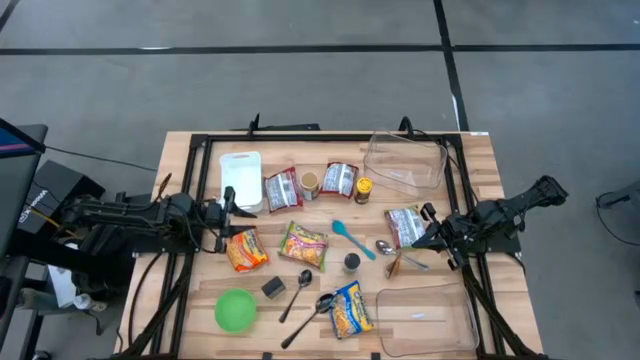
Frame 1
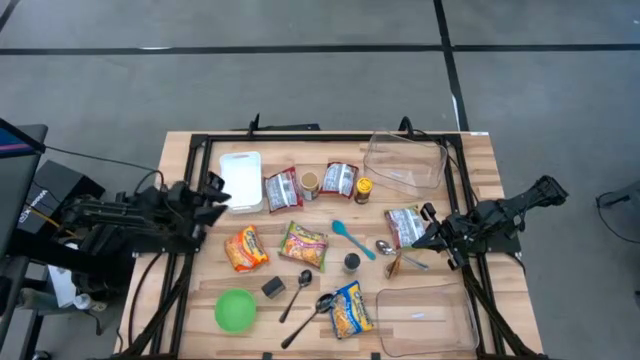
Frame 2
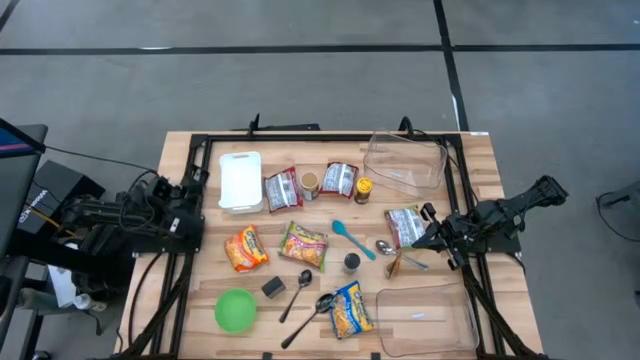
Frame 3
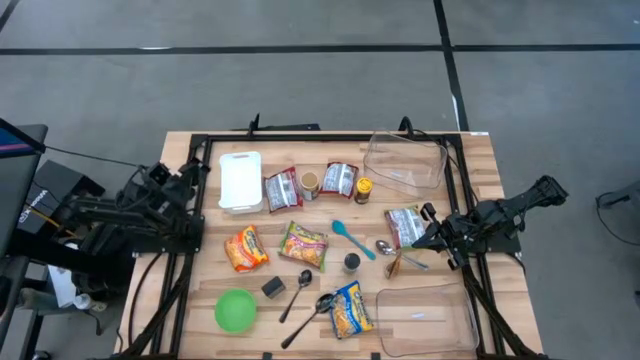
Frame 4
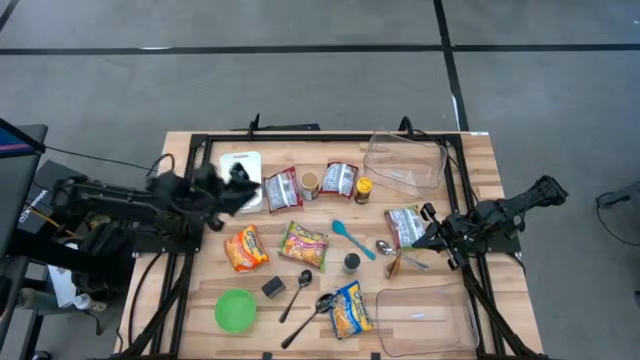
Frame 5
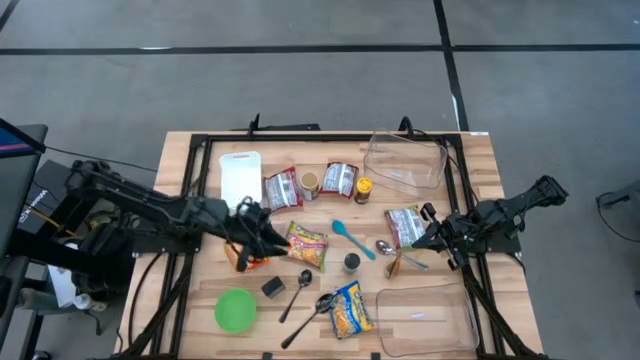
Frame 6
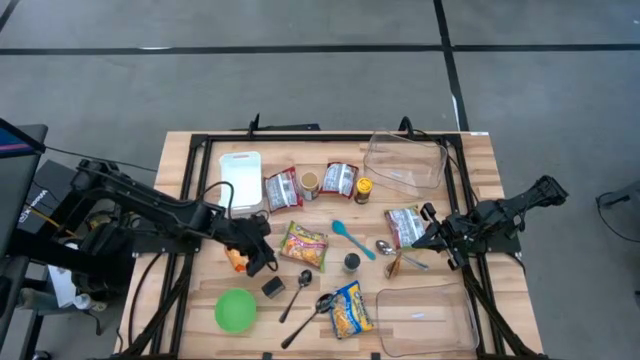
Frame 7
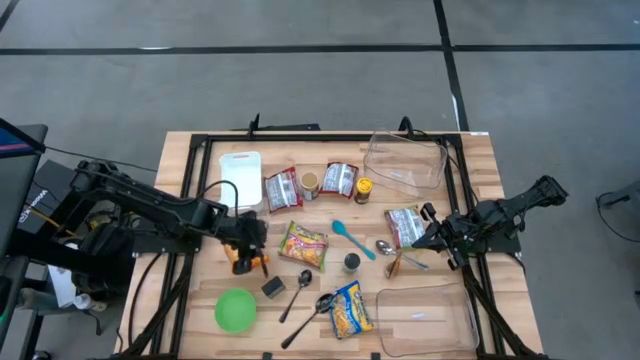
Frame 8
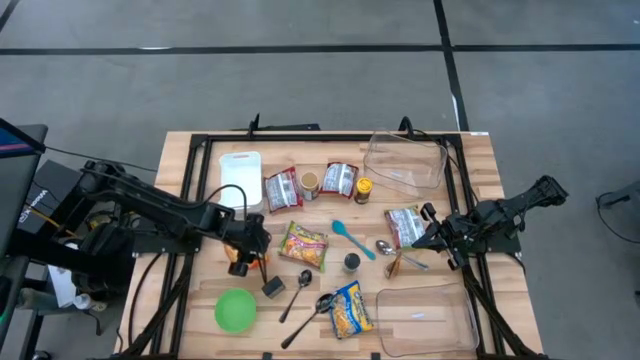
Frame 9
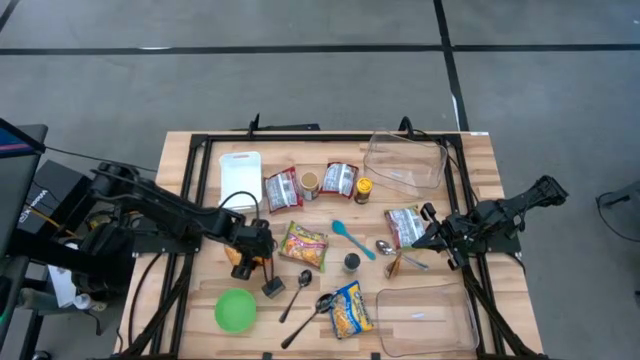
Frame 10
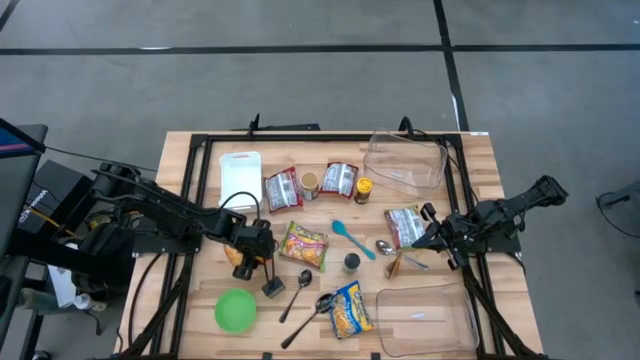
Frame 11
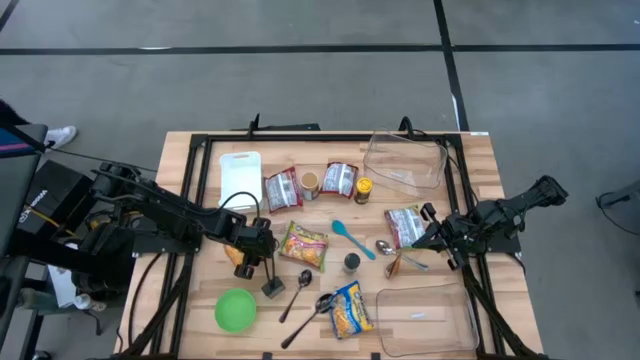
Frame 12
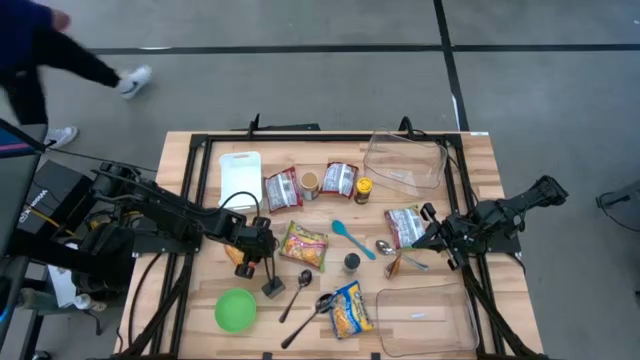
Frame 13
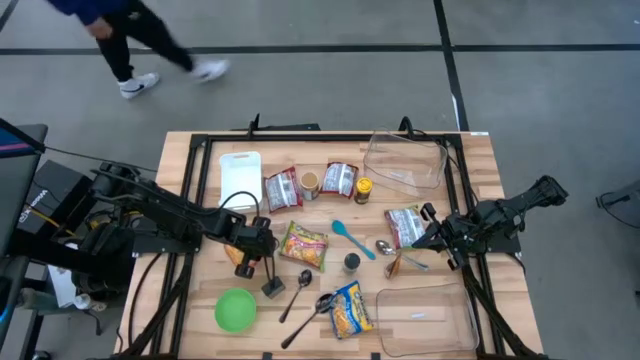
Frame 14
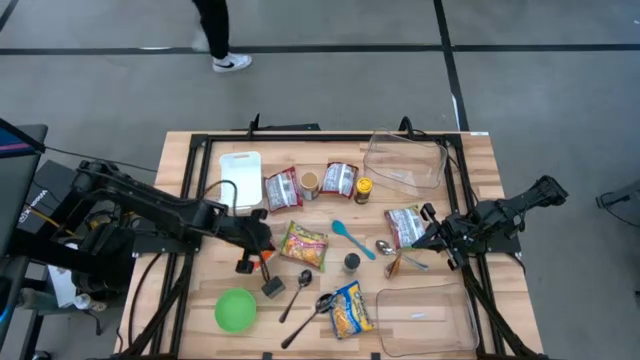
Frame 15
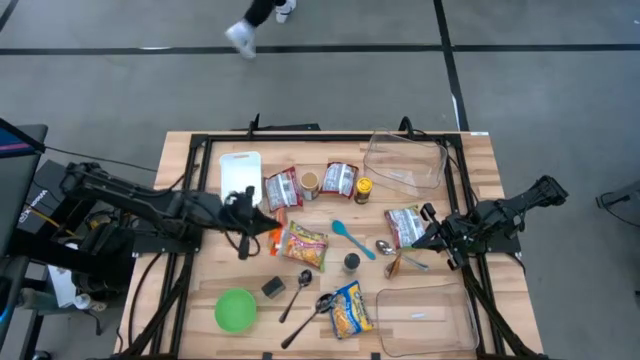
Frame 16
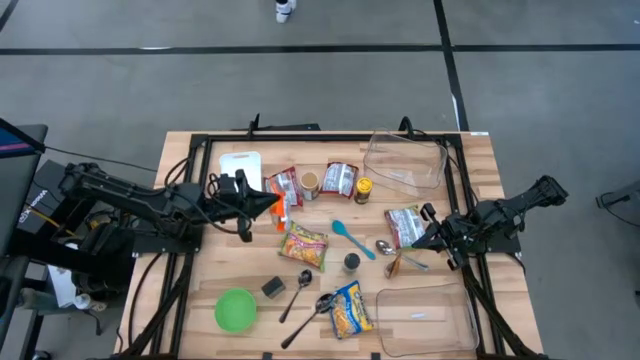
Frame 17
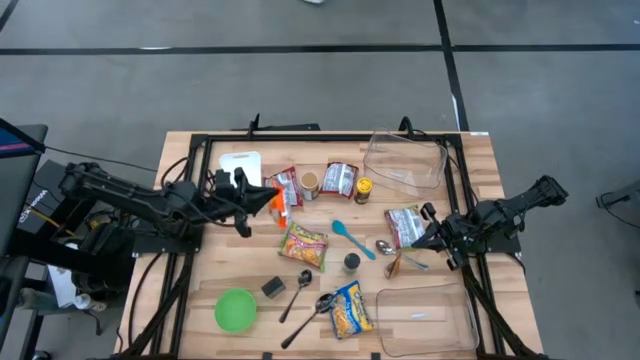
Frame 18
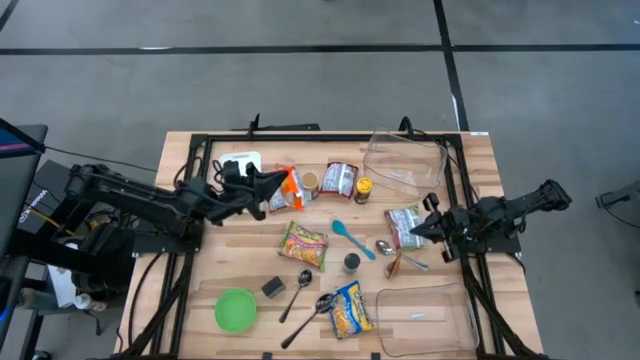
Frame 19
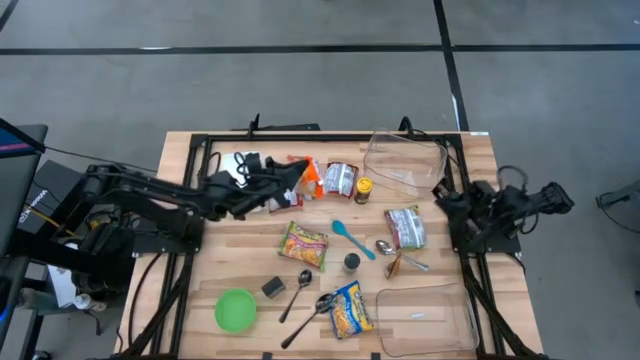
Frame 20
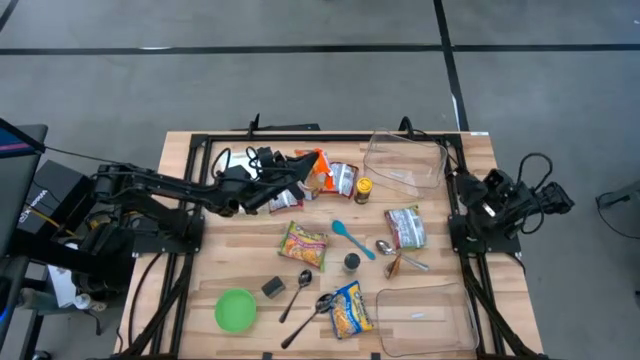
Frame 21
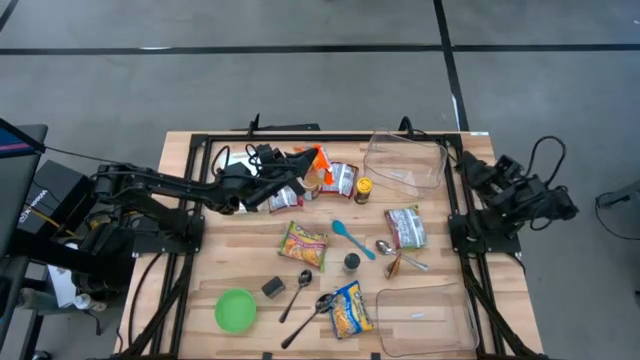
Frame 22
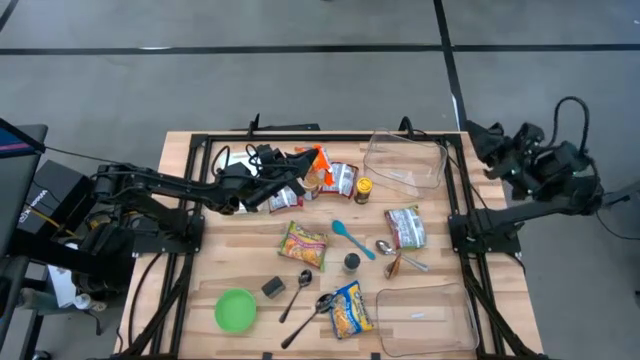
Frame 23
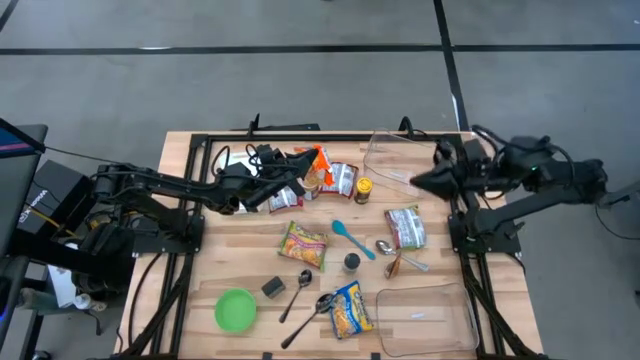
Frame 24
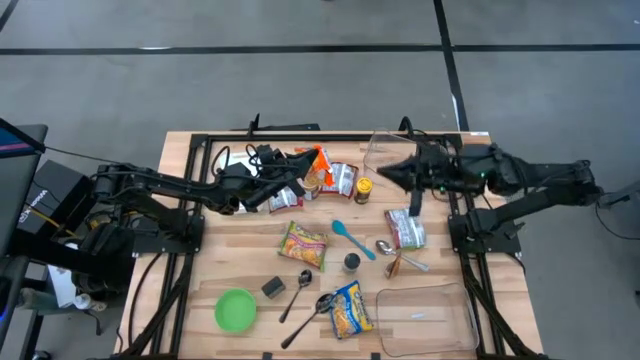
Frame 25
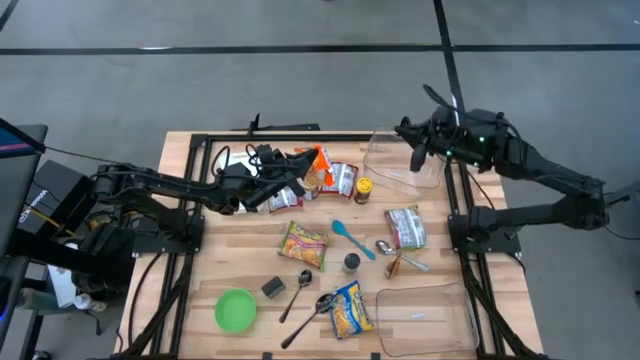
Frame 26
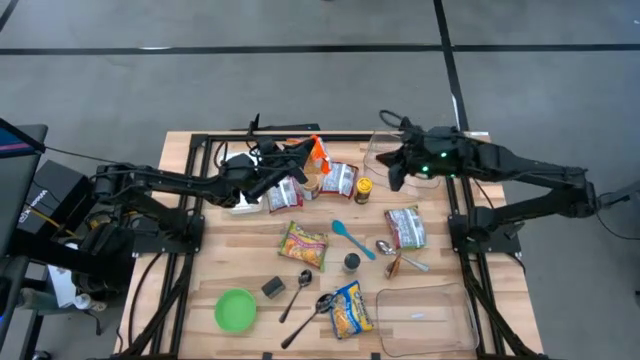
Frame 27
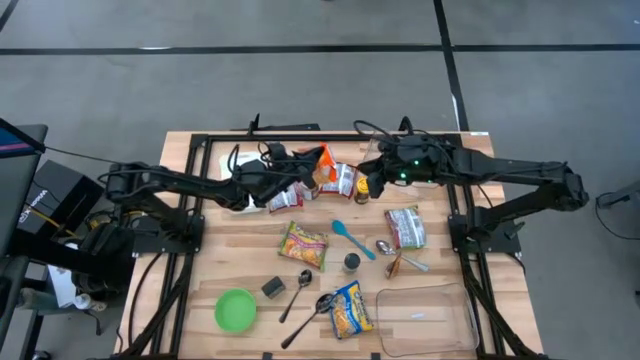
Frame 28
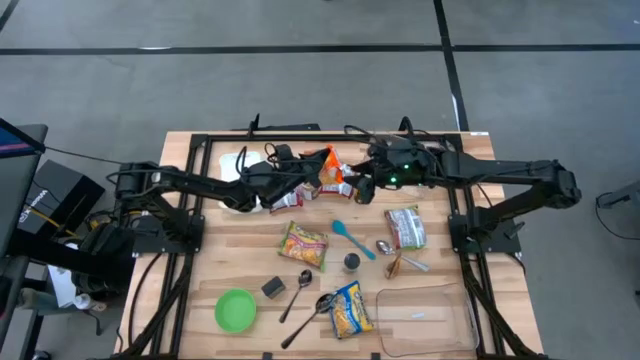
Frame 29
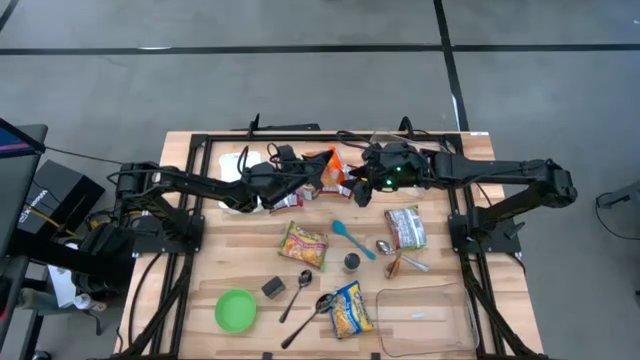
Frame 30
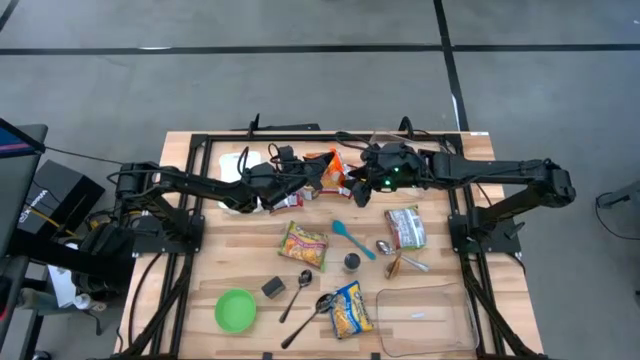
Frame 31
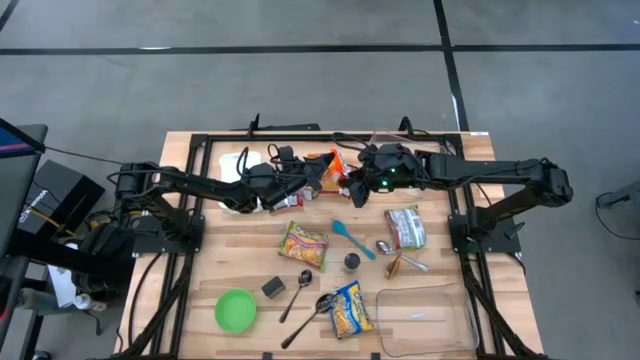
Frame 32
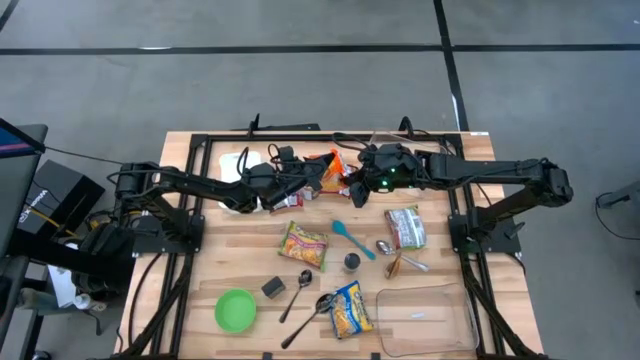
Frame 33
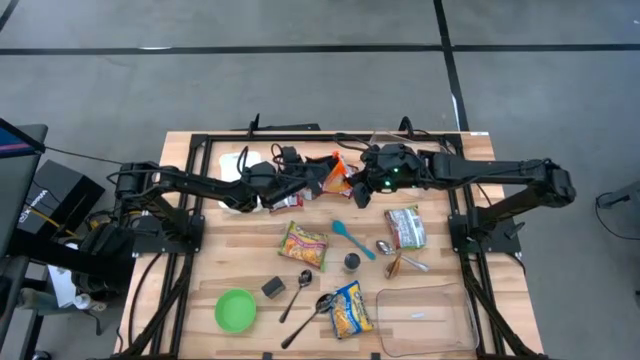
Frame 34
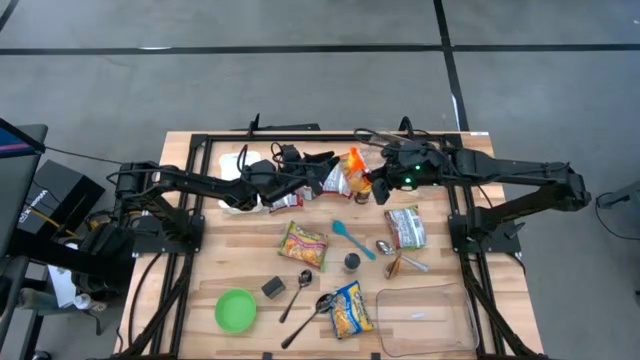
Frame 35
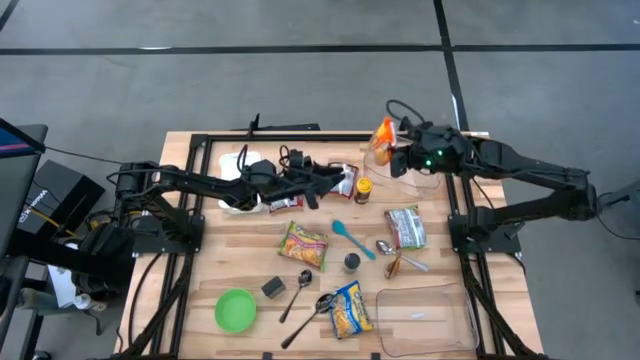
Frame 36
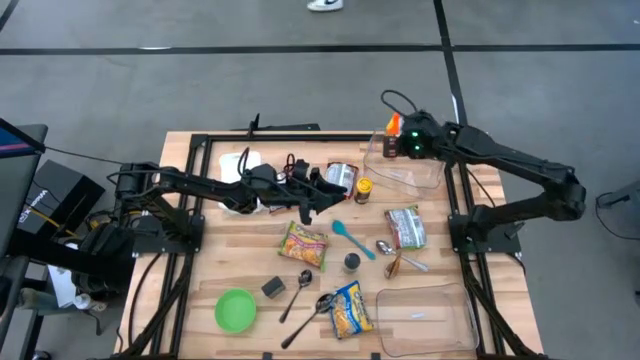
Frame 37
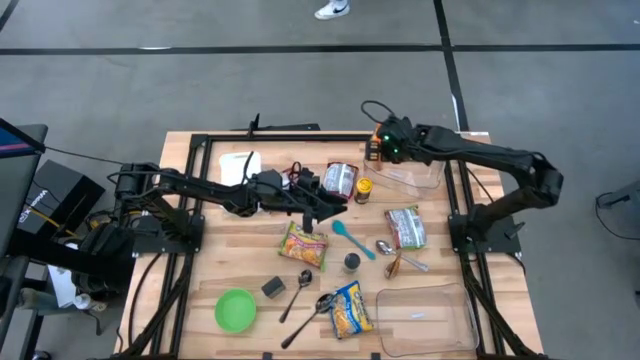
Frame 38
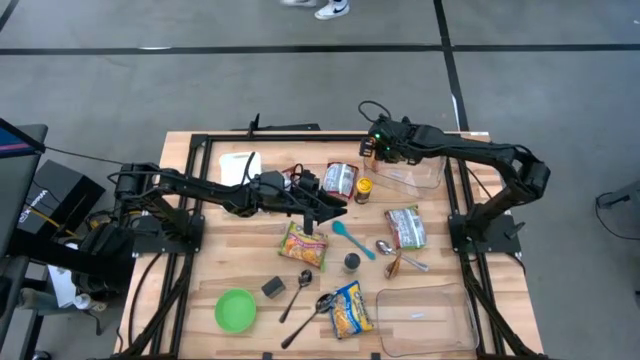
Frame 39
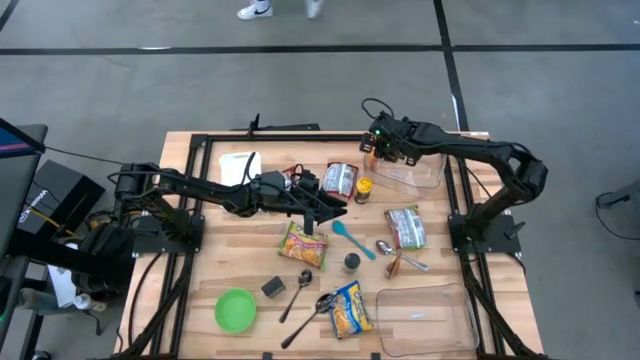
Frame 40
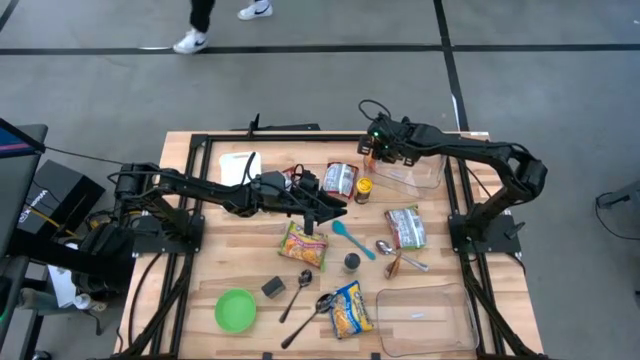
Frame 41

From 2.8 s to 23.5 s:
Task: Pick & Place Food Item
Put the orange noodle pack into the top transparent bin
